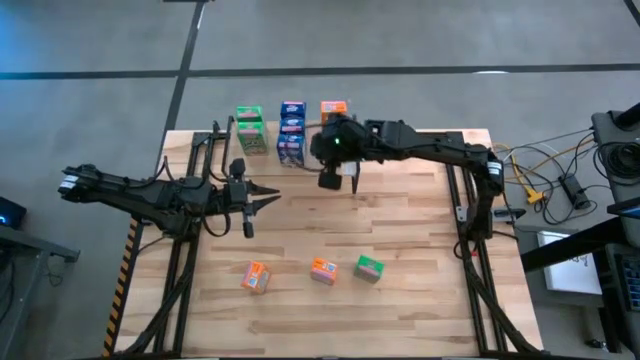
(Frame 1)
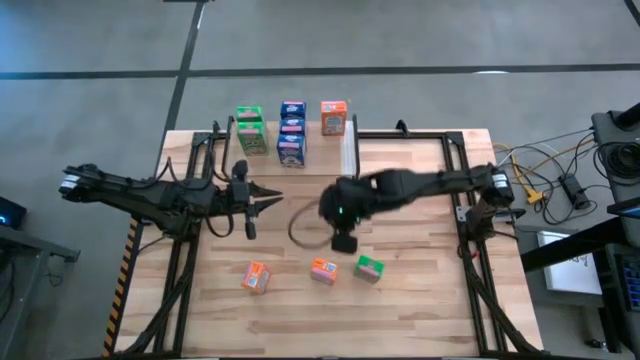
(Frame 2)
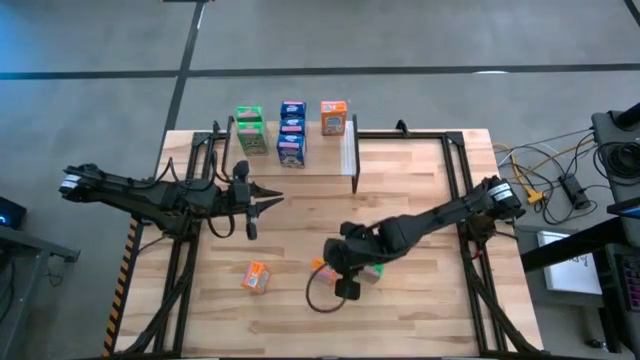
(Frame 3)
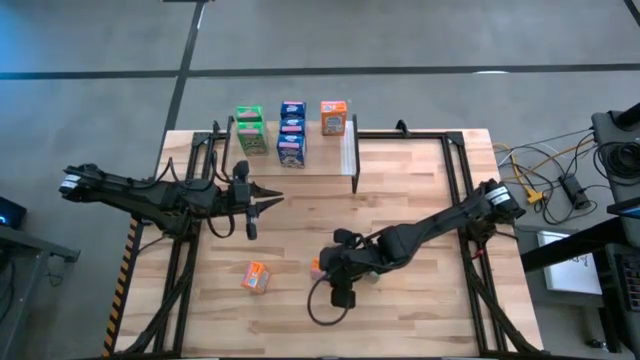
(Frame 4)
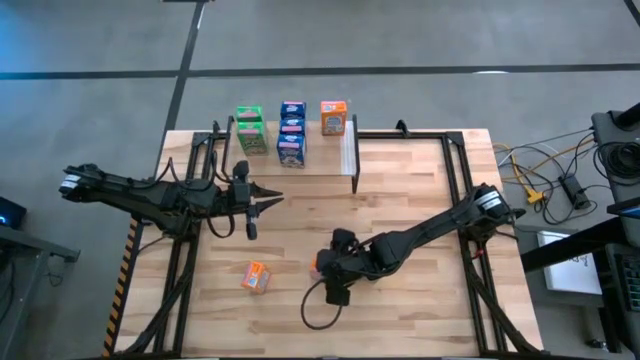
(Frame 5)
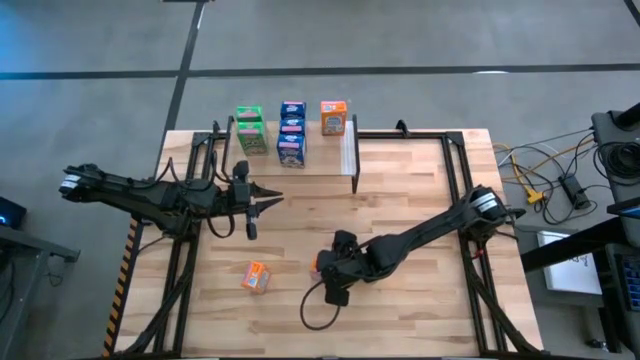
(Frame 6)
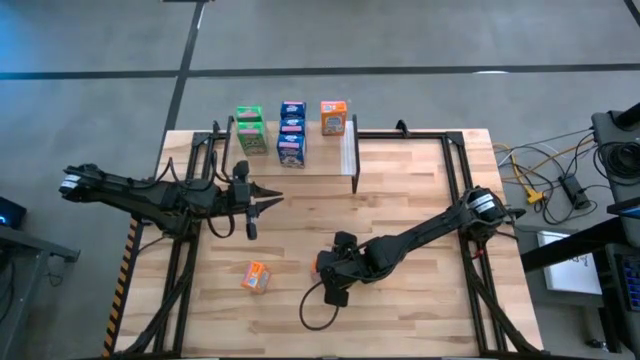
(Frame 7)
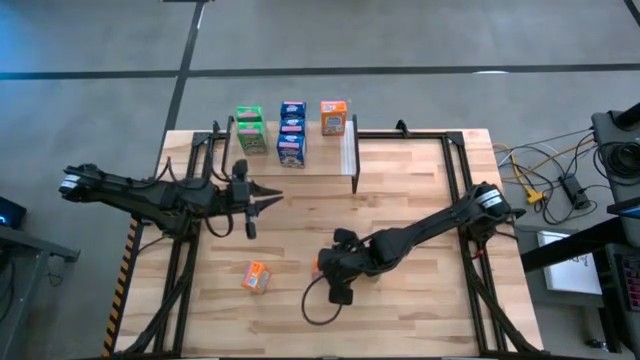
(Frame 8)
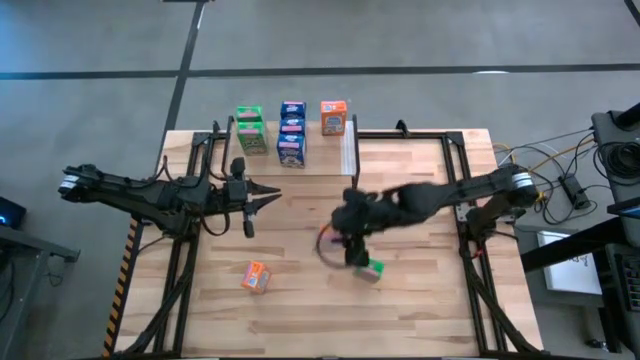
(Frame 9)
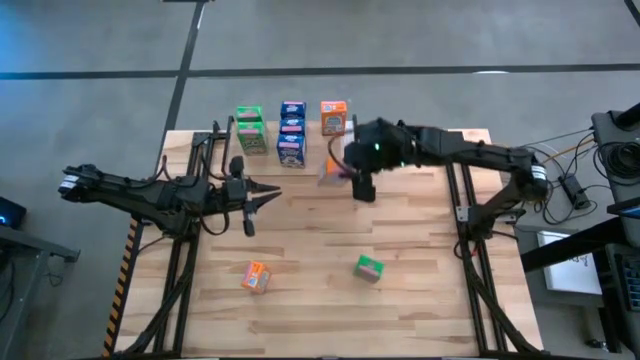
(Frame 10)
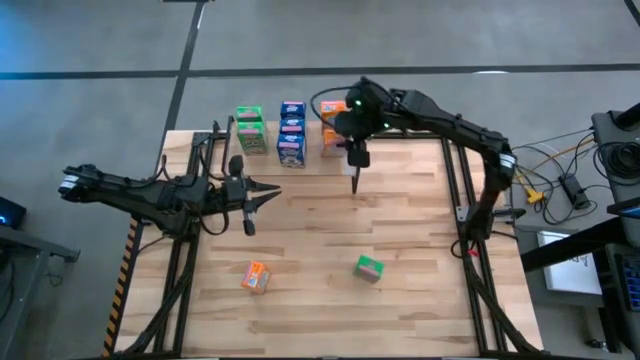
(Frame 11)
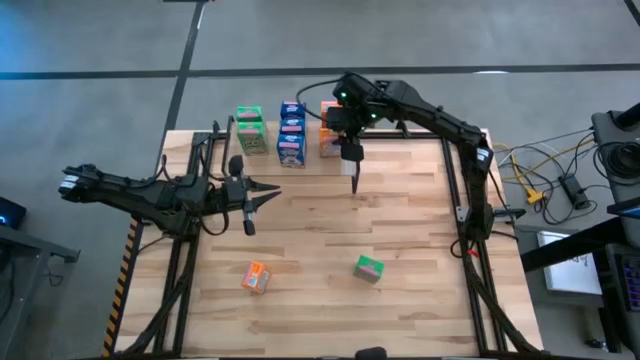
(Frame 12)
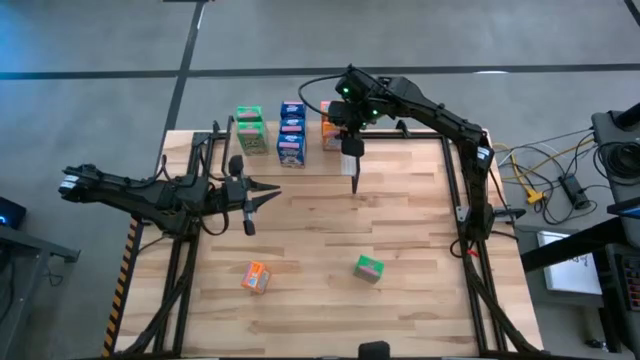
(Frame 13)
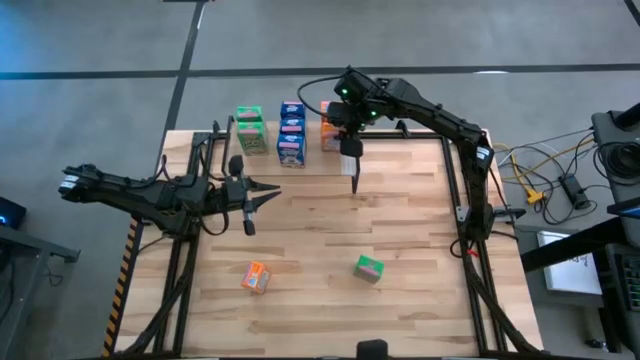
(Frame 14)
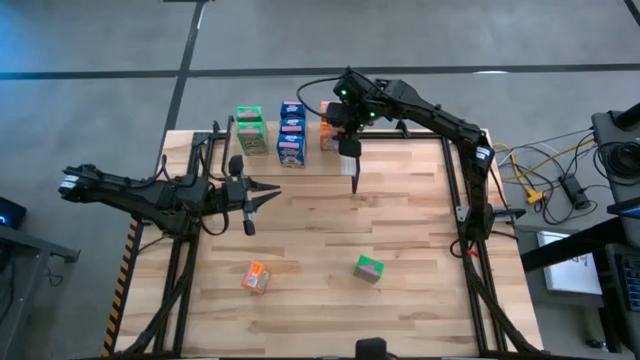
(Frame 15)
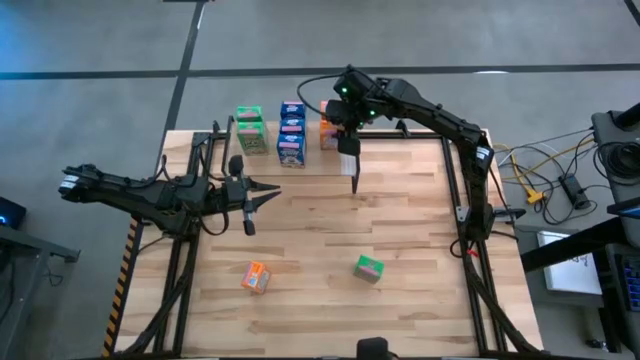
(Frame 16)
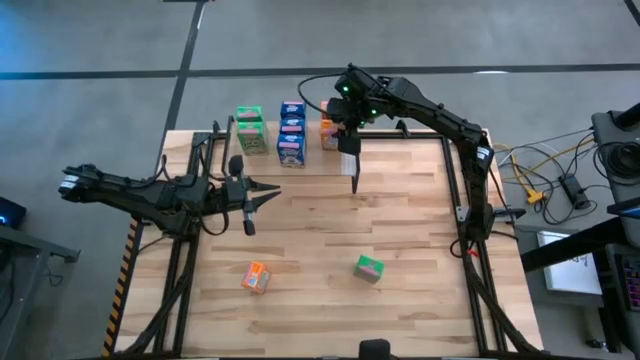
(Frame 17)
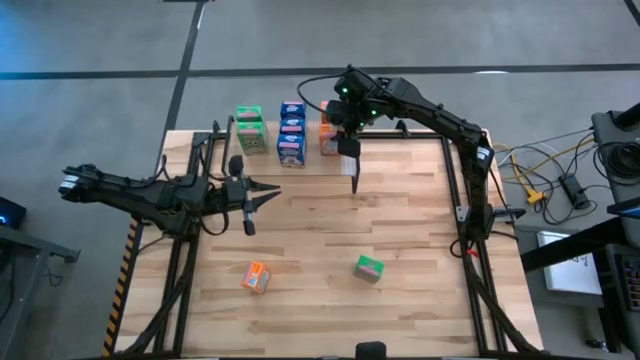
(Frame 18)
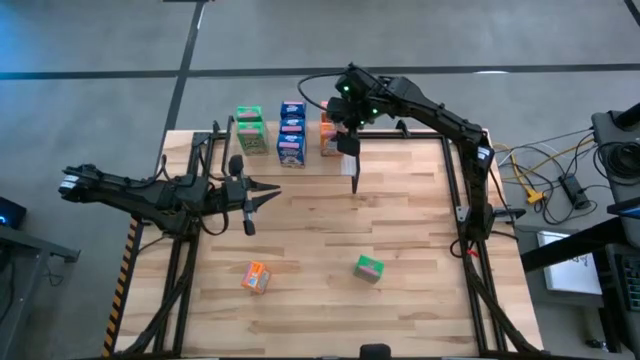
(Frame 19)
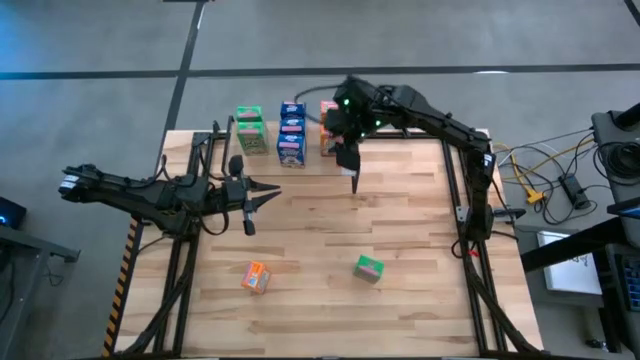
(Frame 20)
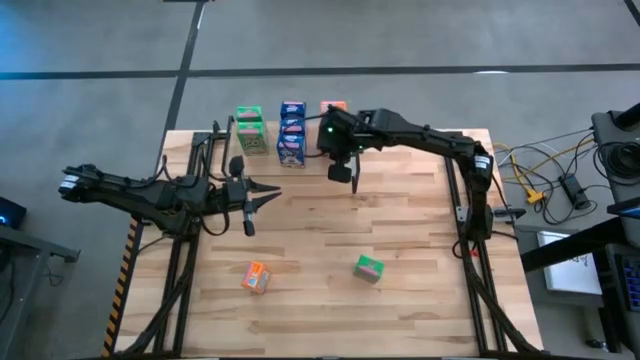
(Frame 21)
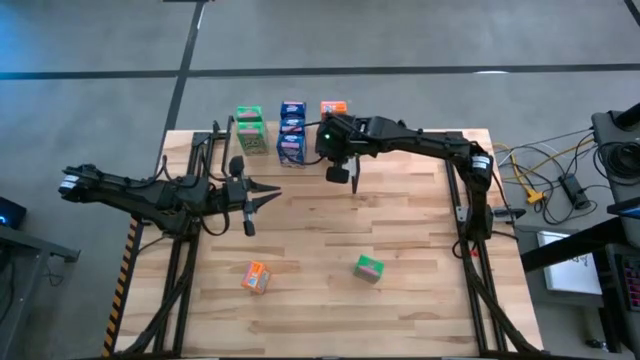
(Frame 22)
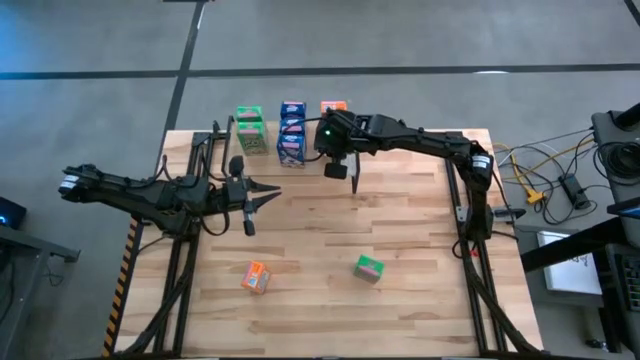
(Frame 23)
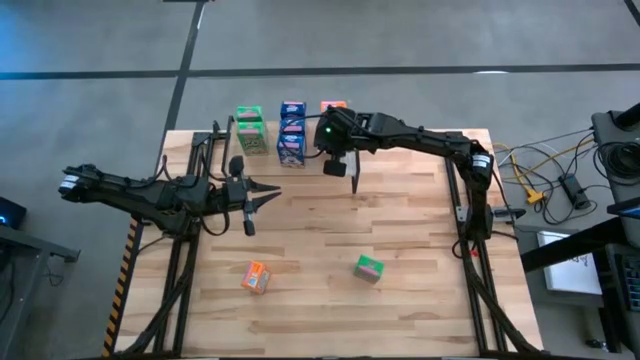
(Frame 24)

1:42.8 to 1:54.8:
Task: Stack cereal on shelf
Put the right orange cereal box on the shelf aligned with the other orange cereal box

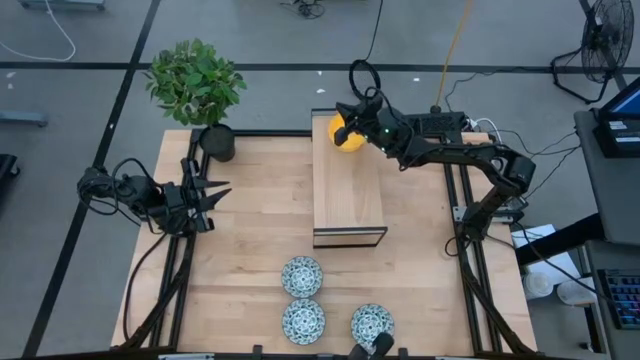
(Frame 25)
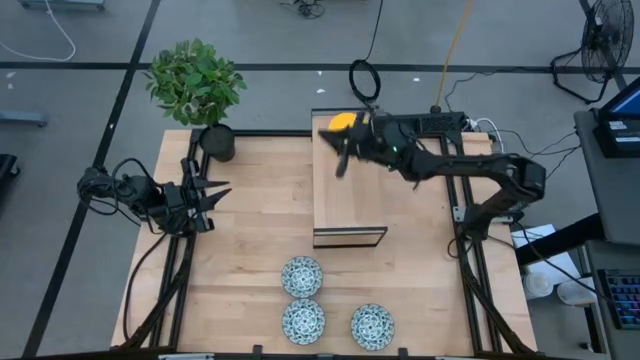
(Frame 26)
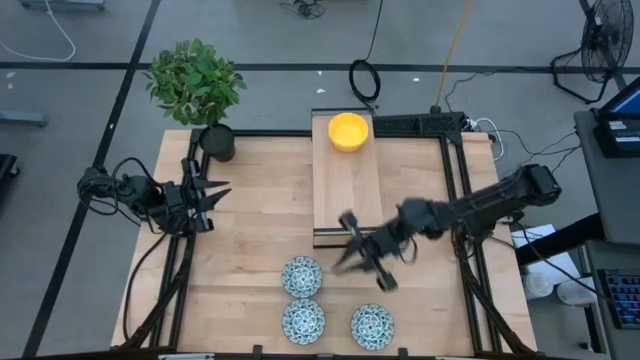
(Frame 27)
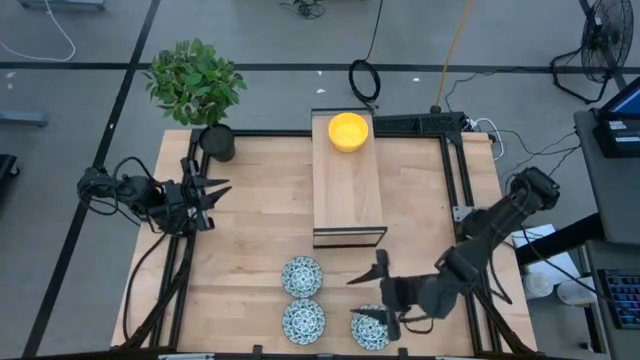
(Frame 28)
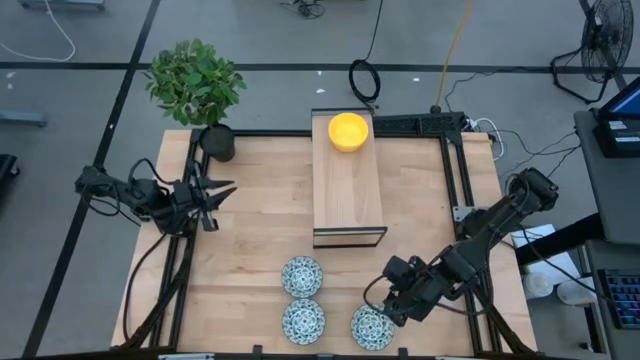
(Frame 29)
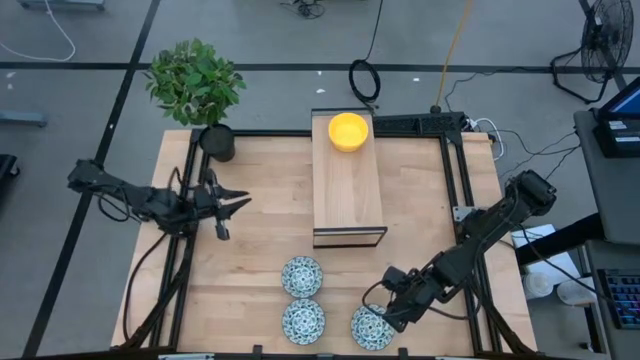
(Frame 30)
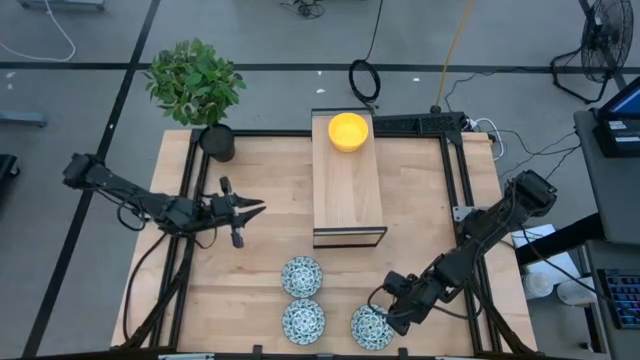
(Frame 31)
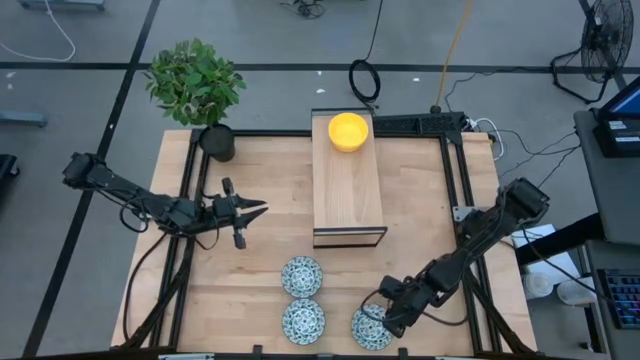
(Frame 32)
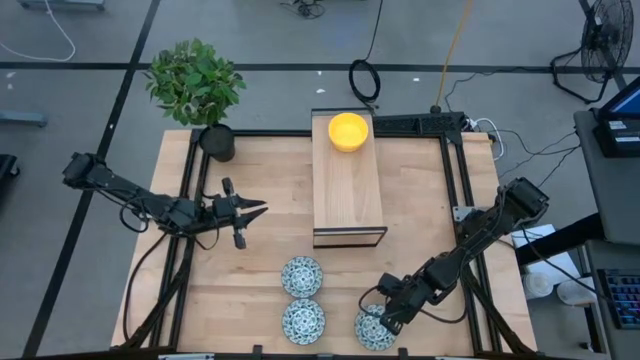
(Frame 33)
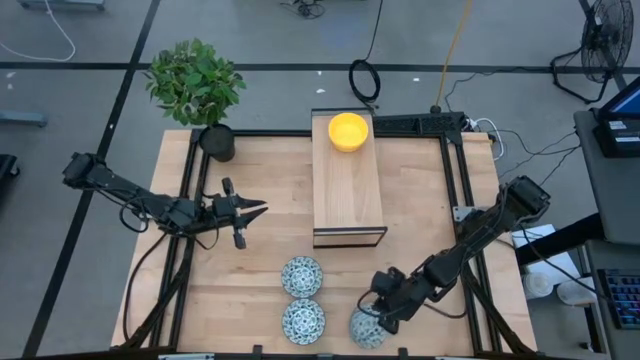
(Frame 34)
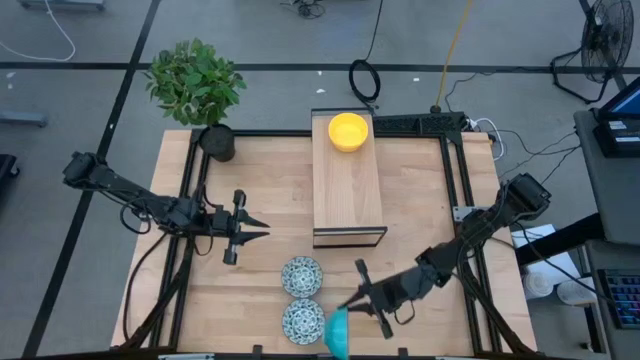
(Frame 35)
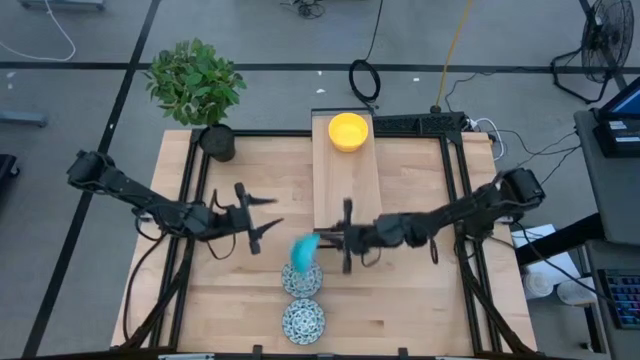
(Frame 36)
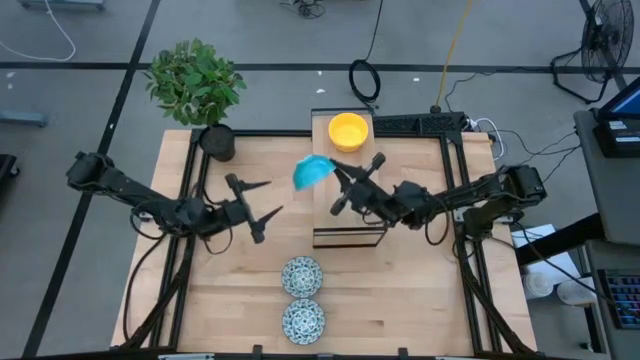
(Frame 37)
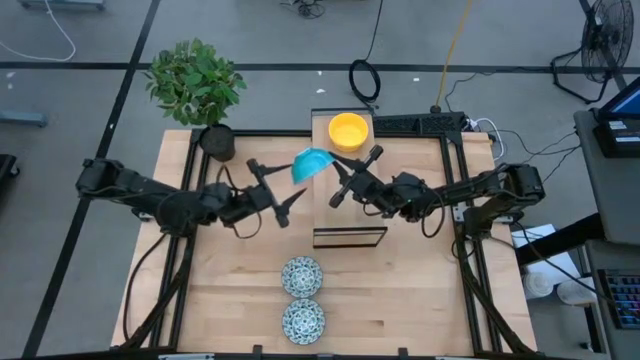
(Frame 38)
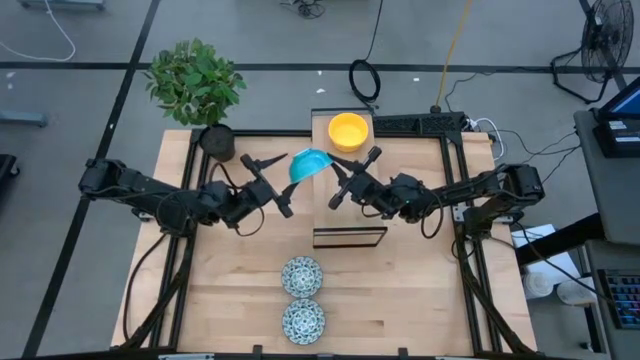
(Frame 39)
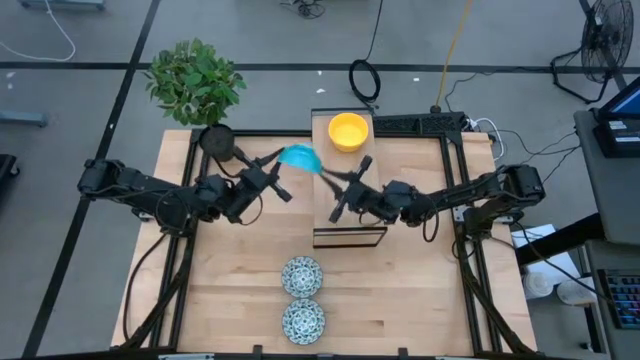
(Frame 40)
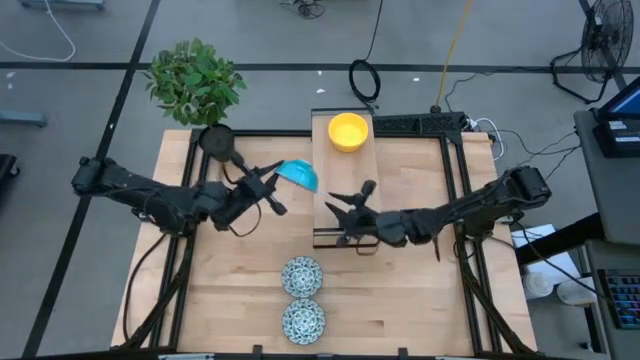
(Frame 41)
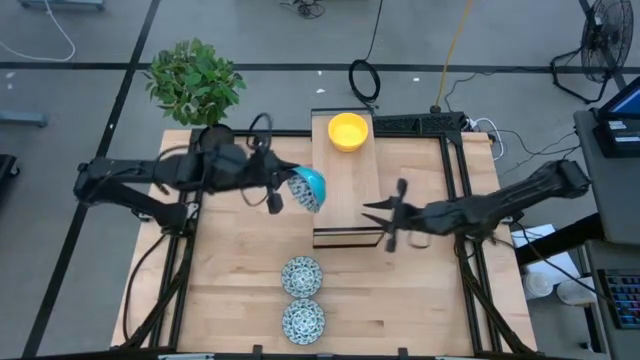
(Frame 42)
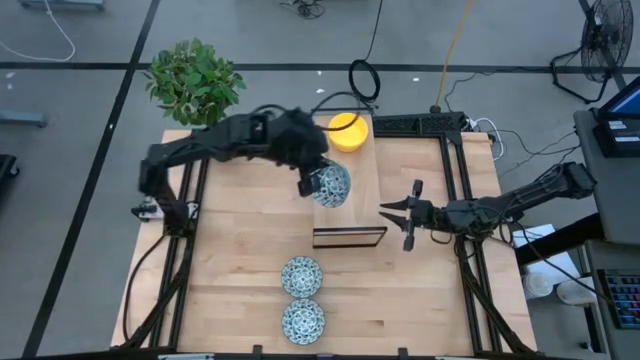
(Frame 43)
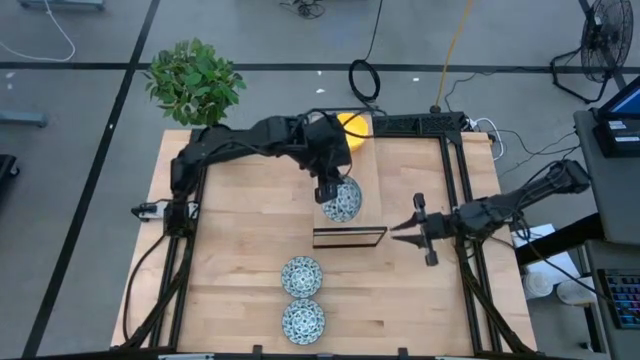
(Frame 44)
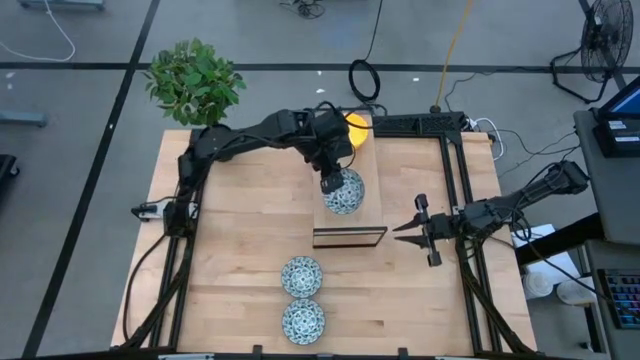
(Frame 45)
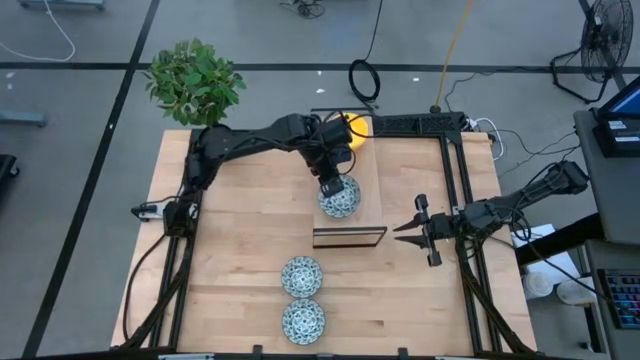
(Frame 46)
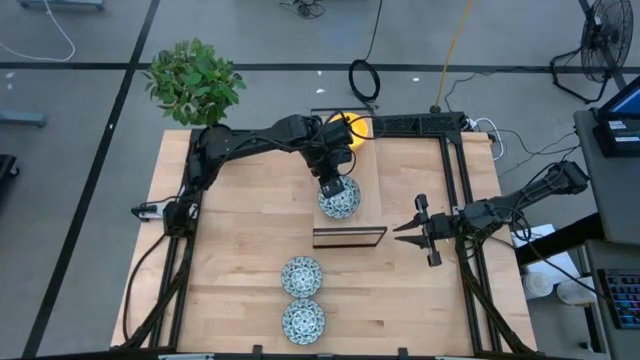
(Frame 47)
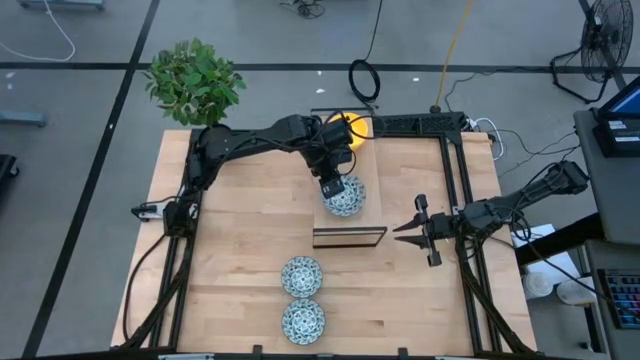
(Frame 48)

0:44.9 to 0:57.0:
Task: Pick & Place Mini bowls
Put the bottom right blue patterned bowl on the shelf
